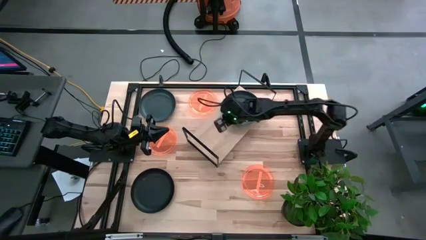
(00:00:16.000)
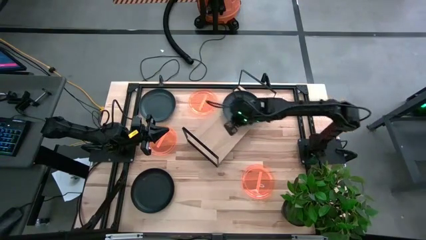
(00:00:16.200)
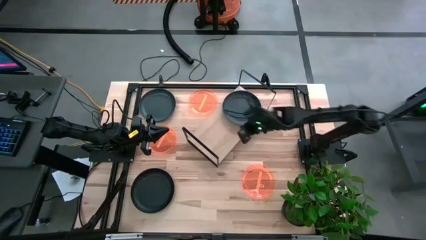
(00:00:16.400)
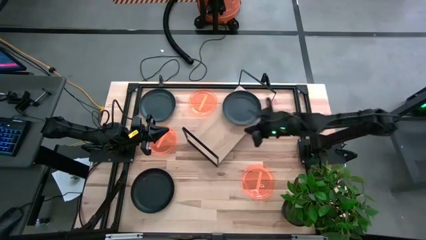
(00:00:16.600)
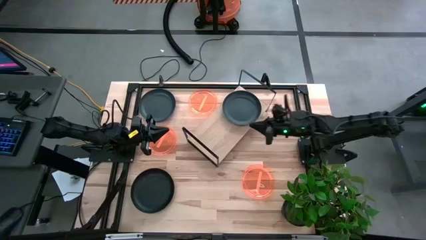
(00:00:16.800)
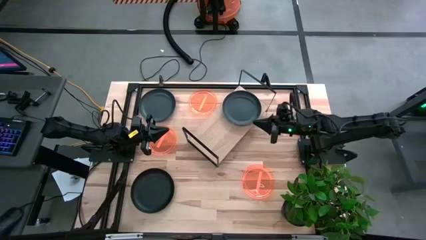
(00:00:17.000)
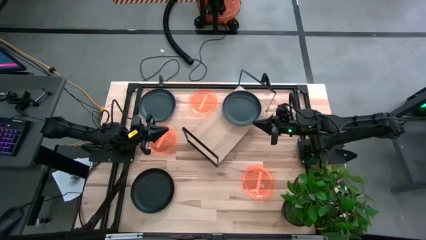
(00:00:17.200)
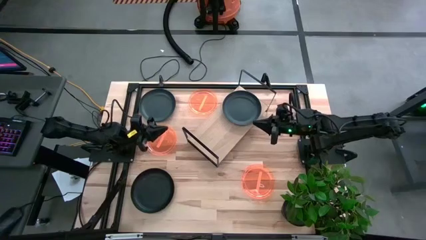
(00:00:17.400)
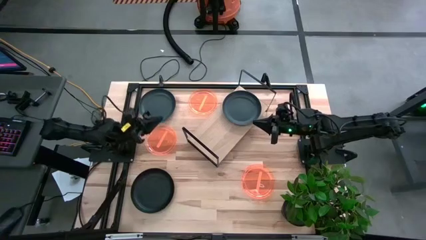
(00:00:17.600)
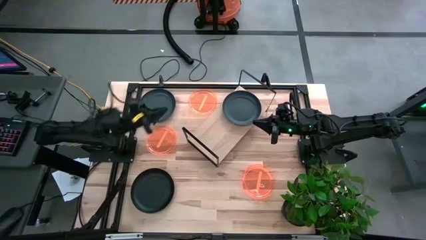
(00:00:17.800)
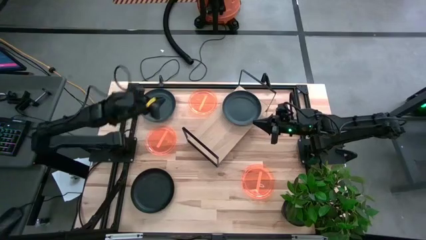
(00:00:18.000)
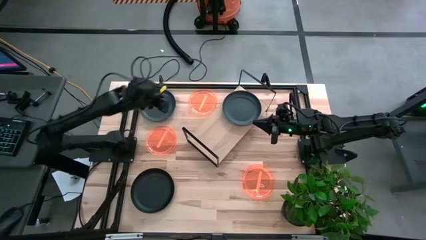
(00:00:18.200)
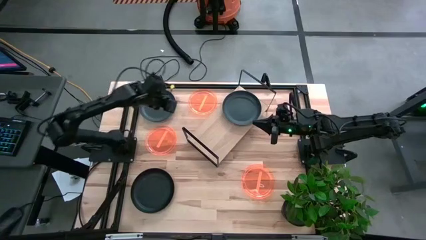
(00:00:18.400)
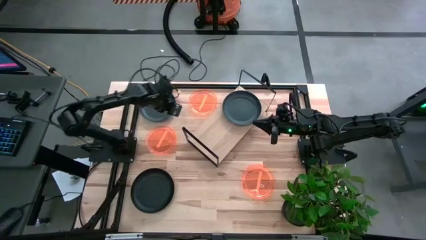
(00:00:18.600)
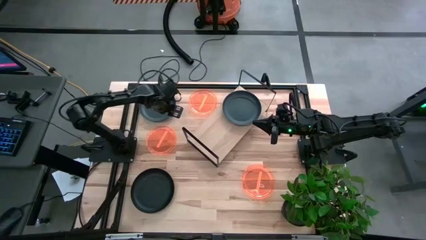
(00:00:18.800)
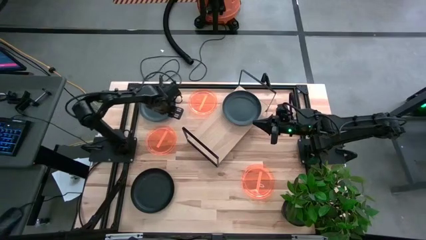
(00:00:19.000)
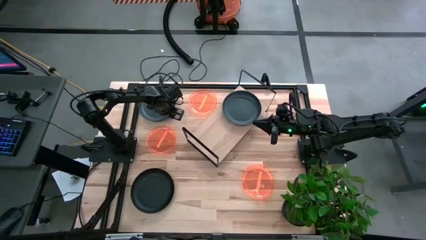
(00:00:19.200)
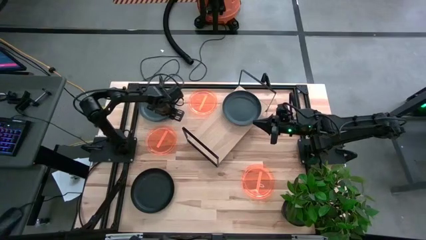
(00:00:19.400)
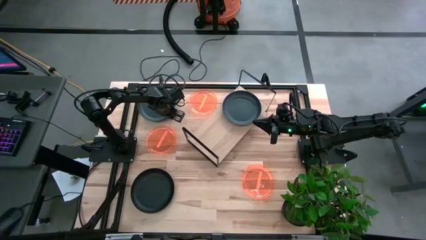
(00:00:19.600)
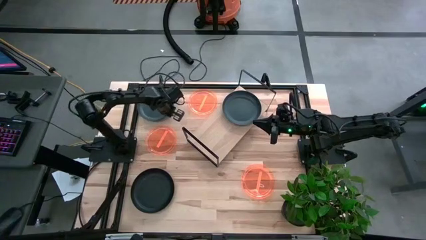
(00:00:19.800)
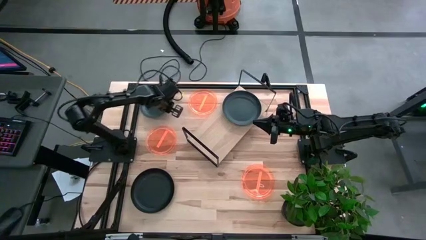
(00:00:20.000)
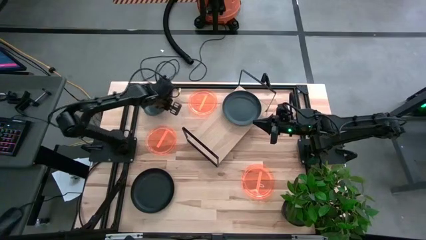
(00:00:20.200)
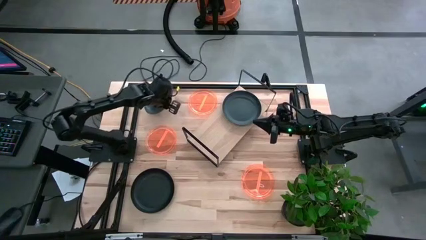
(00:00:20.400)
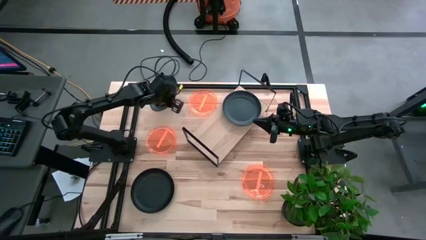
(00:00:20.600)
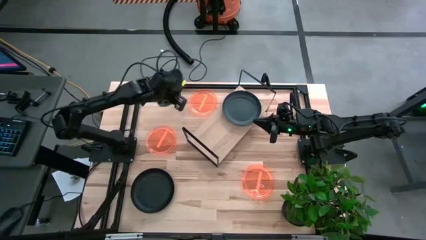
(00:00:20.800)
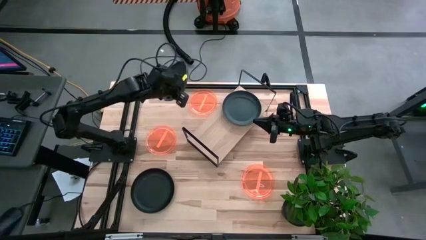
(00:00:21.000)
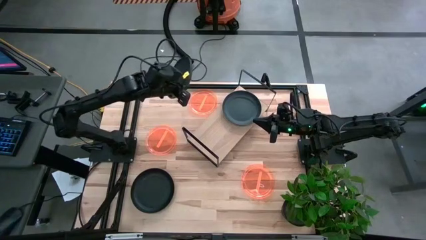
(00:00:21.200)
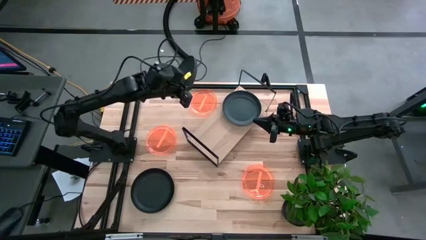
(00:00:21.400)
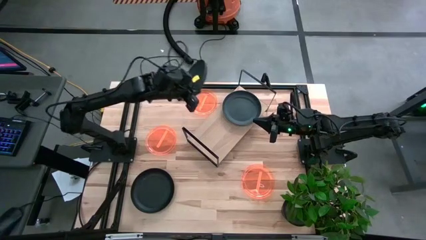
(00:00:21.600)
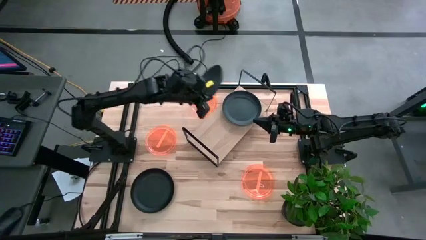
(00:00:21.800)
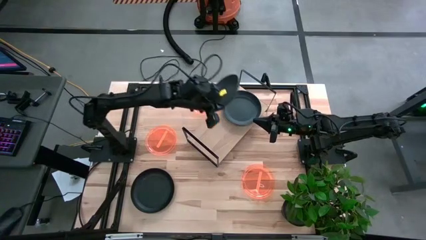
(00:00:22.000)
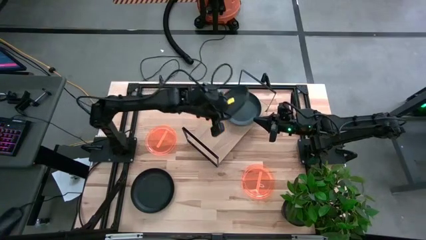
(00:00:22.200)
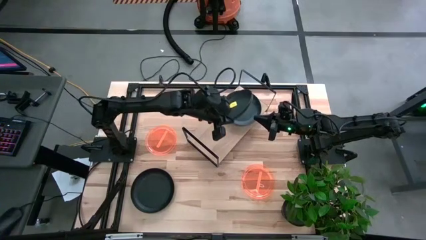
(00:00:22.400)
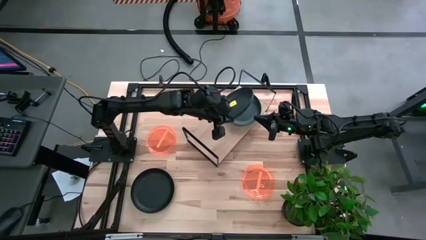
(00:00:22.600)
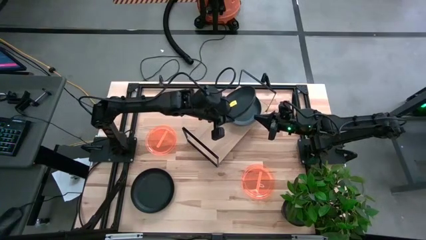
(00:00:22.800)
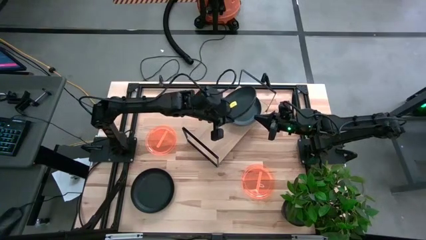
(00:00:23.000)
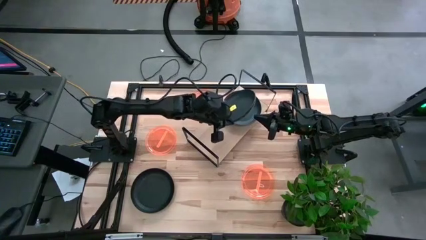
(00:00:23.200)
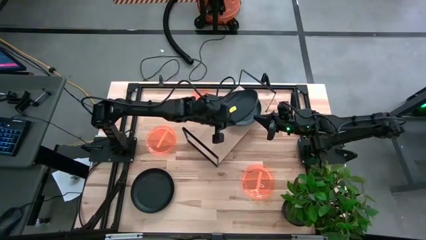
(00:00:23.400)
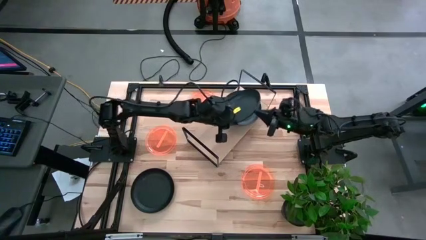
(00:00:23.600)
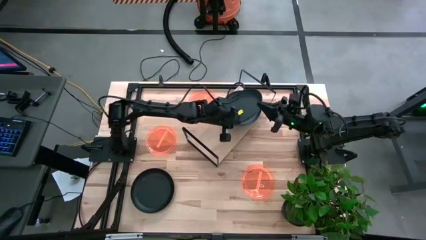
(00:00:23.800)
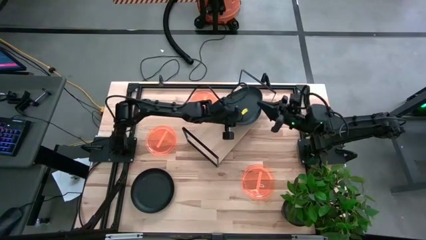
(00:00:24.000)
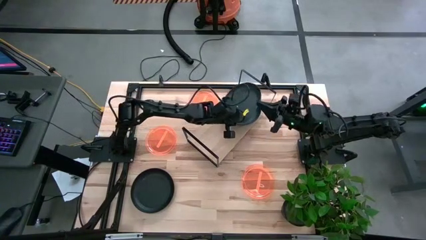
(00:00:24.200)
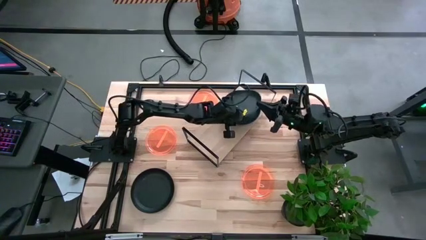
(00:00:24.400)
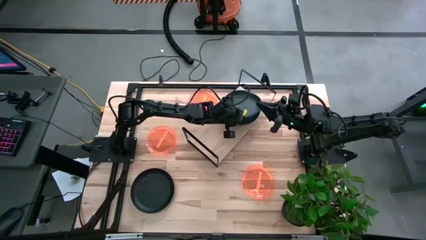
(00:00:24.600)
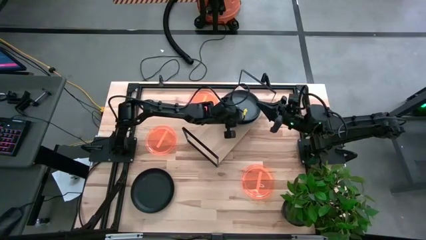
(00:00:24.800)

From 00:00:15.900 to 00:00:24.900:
Task: Place and stack plates onto a shelf
Stack the top black plate on top of the black plate on the shelf

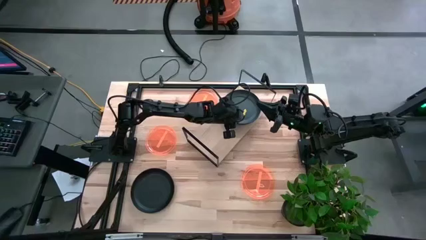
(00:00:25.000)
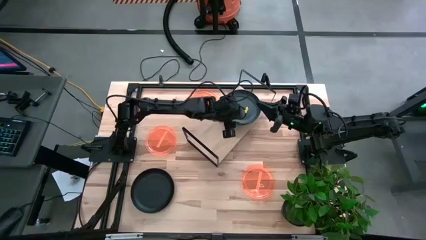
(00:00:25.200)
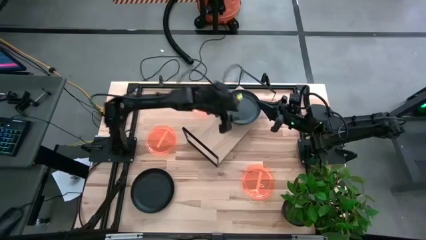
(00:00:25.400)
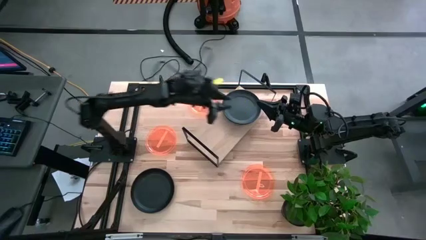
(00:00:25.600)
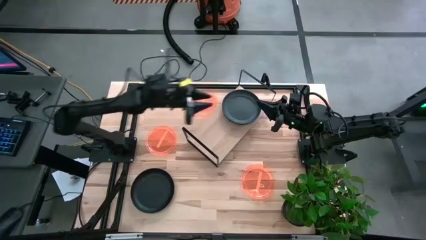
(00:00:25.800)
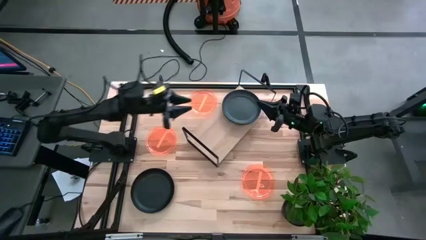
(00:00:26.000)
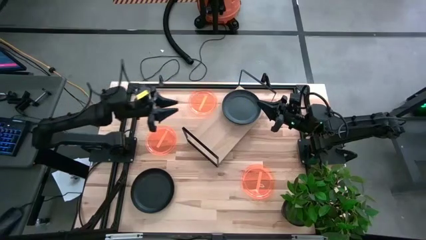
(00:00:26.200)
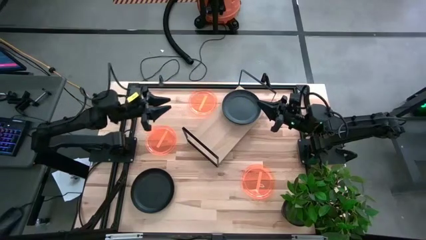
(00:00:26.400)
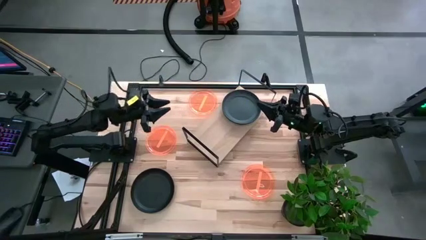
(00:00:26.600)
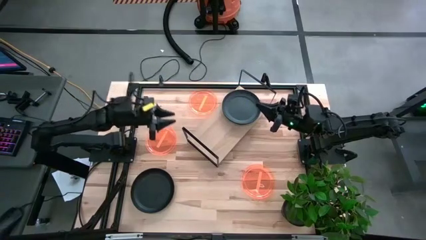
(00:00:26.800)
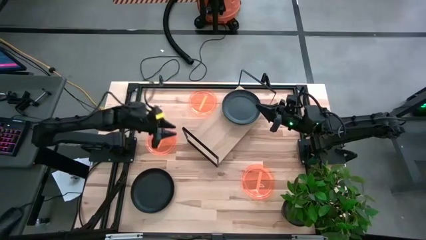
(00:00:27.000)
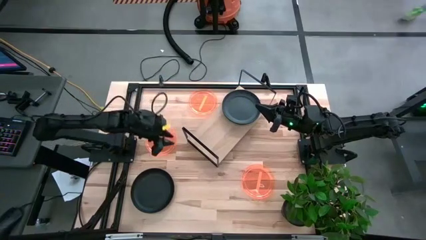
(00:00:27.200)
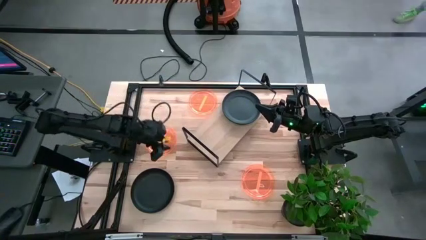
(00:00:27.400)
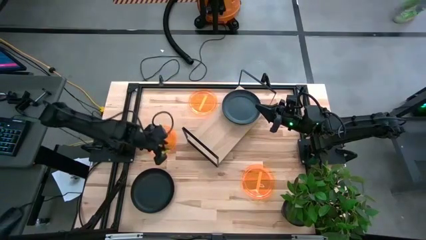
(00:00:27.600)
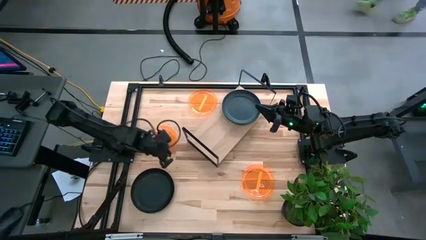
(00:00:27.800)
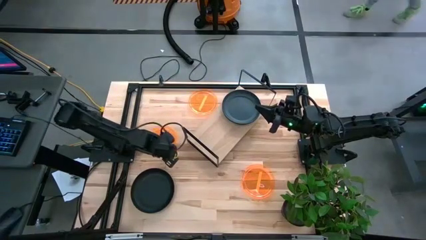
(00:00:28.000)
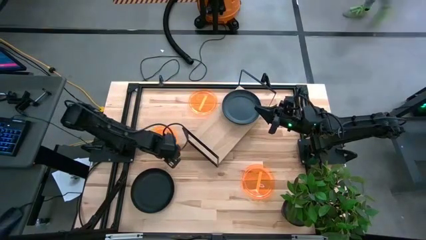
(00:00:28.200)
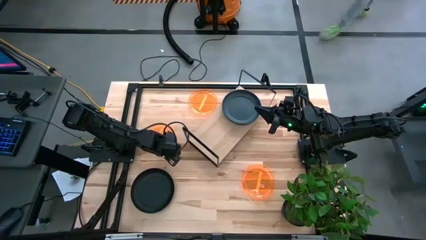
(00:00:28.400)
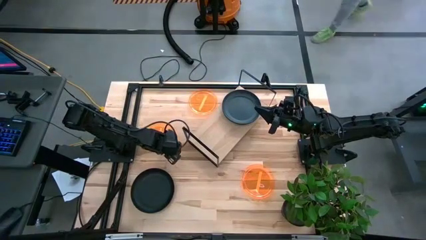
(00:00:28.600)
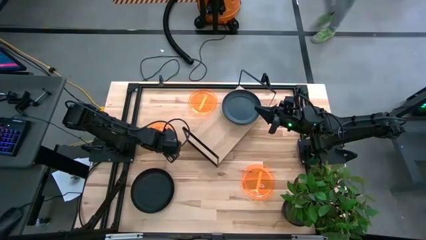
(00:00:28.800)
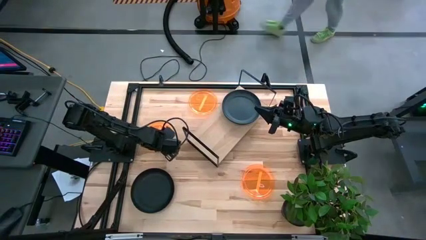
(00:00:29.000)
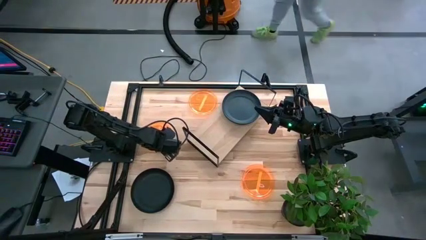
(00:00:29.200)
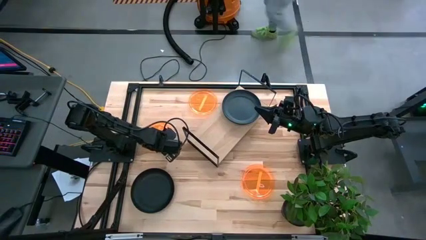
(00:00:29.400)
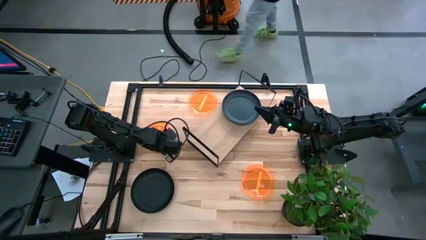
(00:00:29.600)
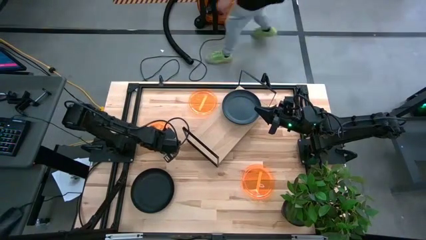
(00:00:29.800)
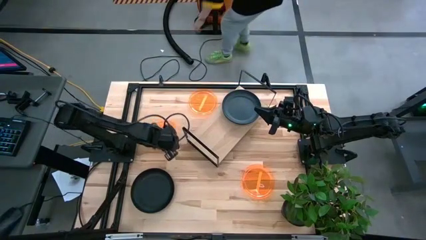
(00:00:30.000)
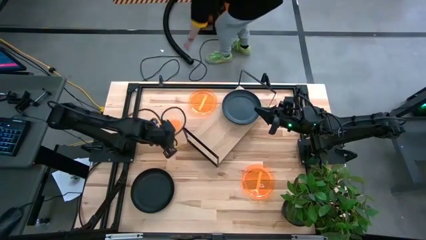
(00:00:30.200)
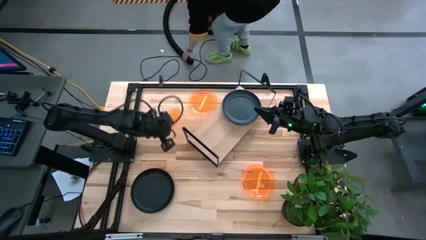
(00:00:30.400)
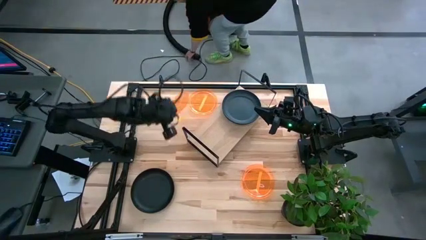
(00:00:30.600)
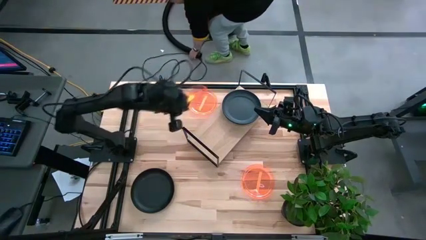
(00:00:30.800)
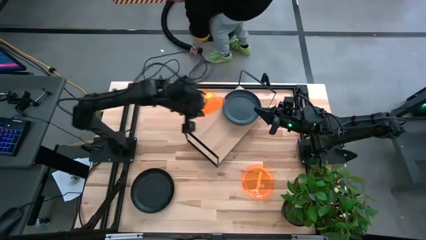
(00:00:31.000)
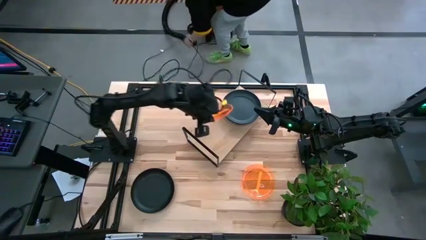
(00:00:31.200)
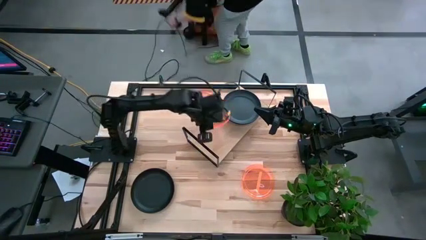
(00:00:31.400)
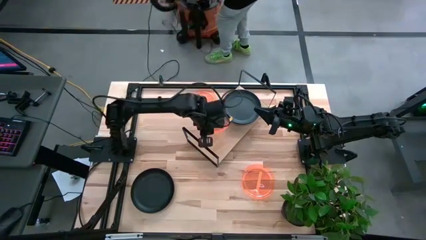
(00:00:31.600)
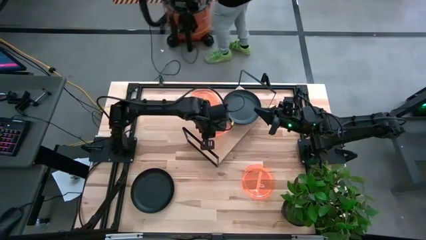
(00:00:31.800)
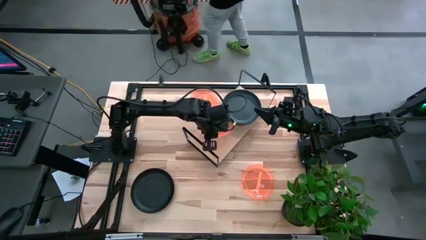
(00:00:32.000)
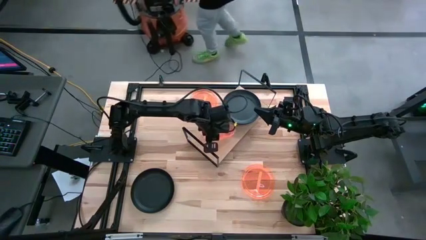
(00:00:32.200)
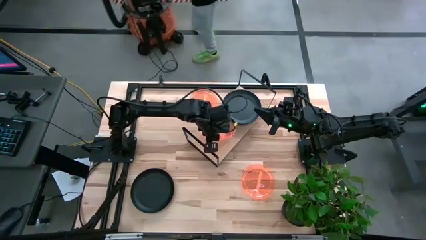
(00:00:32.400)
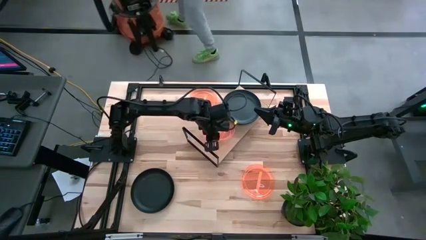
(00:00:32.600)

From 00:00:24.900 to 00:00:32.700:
Put the left orange plate on the shelf
